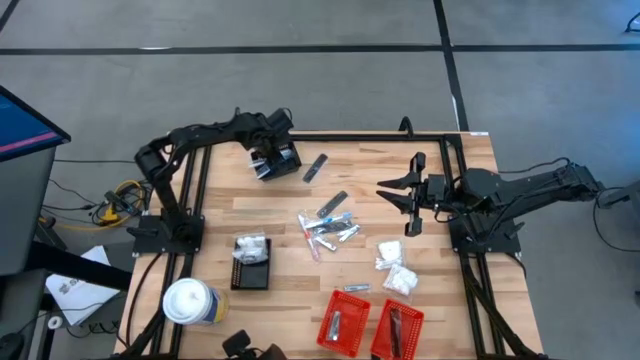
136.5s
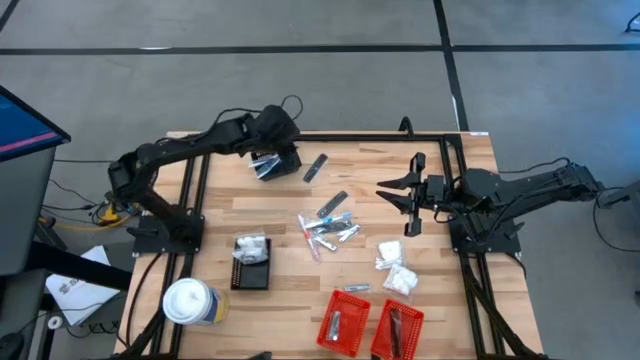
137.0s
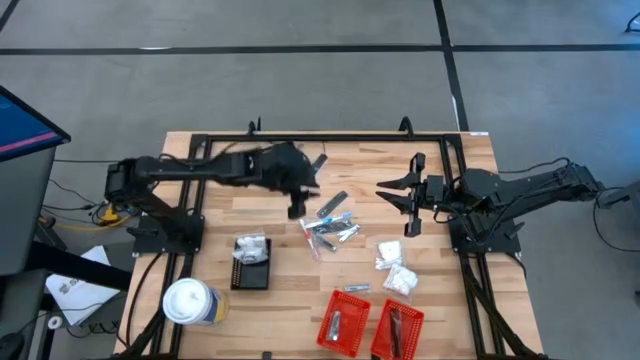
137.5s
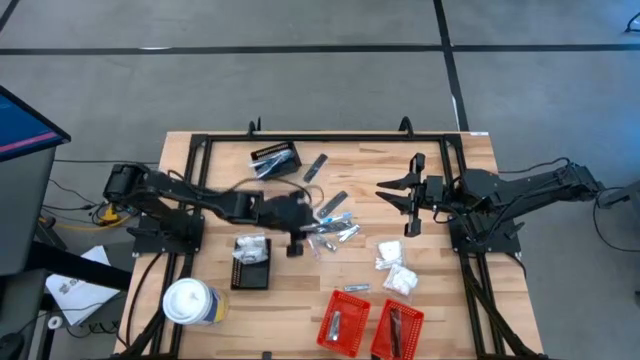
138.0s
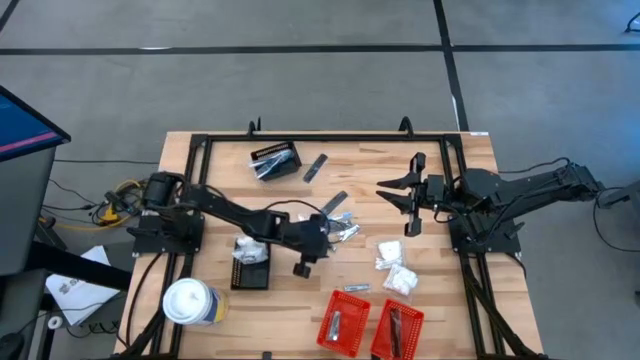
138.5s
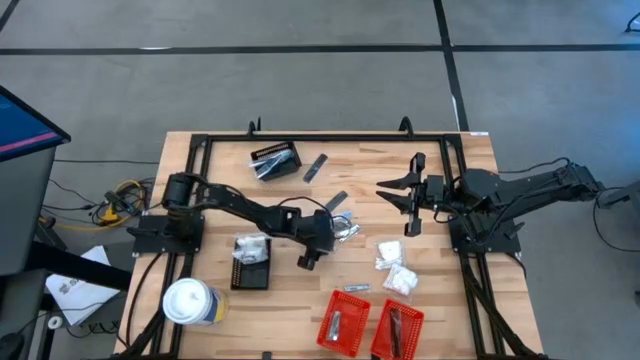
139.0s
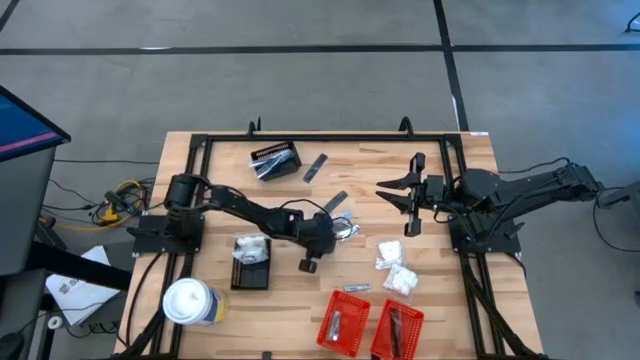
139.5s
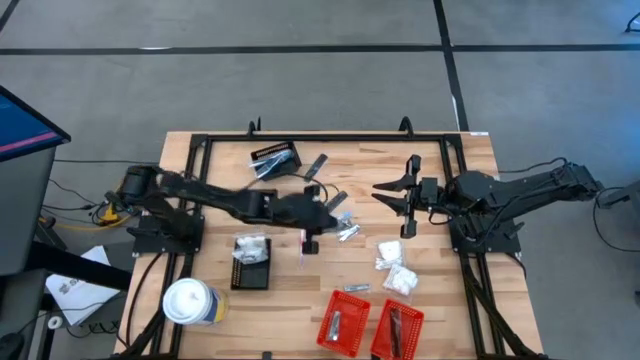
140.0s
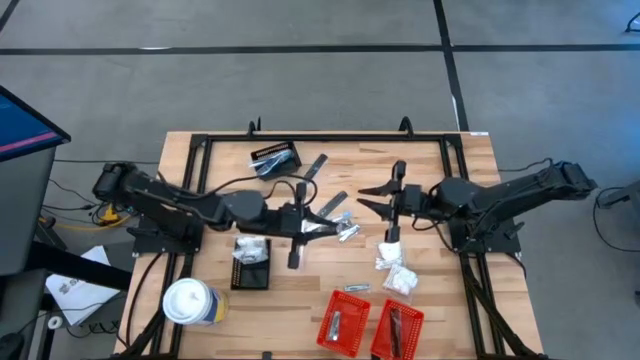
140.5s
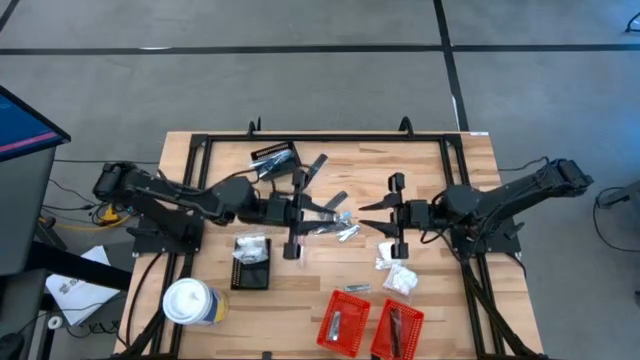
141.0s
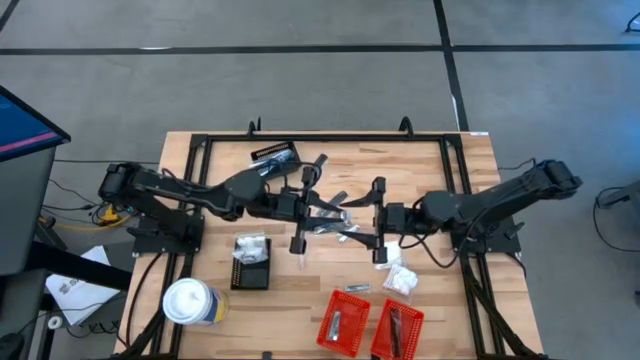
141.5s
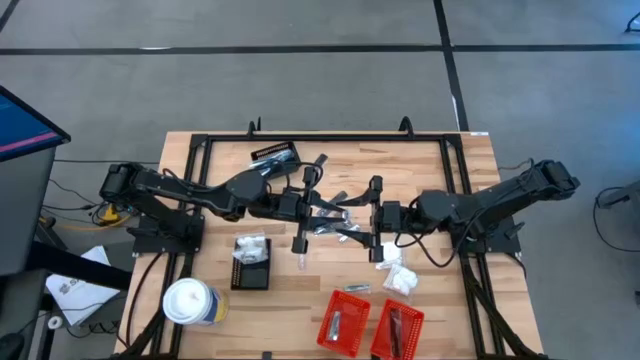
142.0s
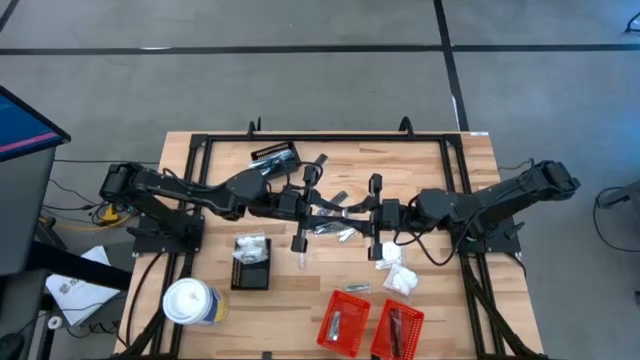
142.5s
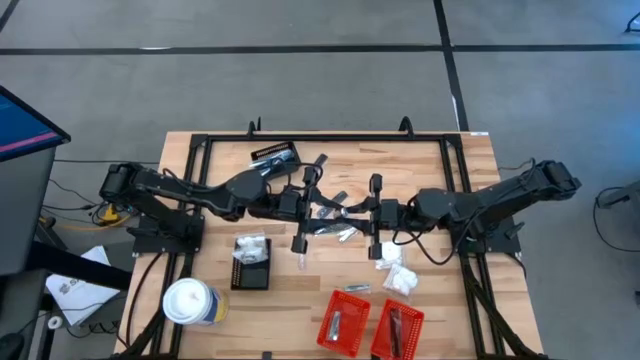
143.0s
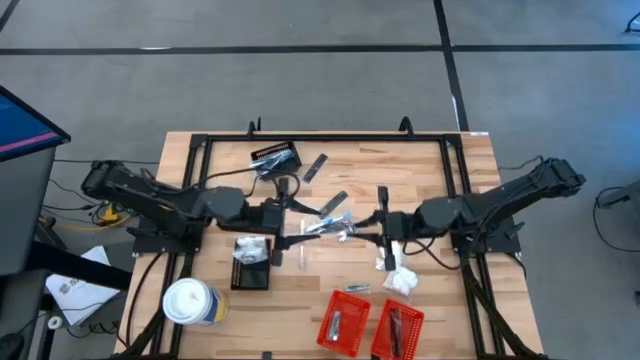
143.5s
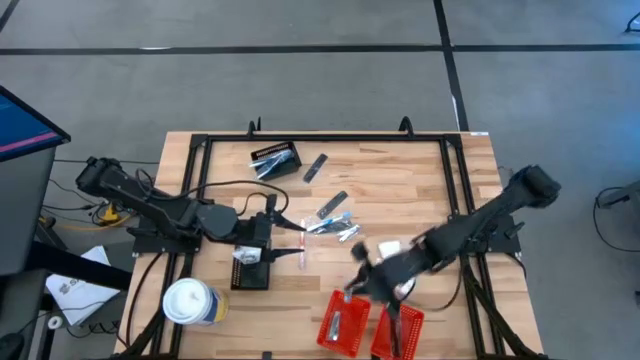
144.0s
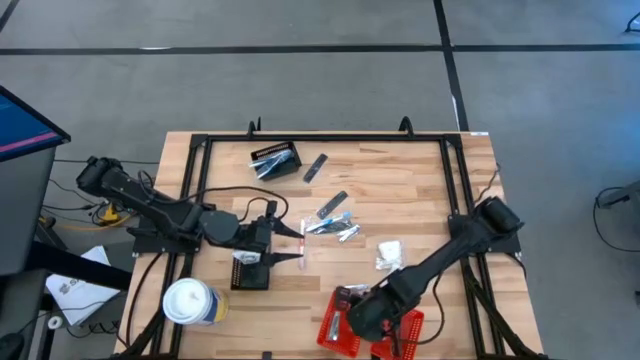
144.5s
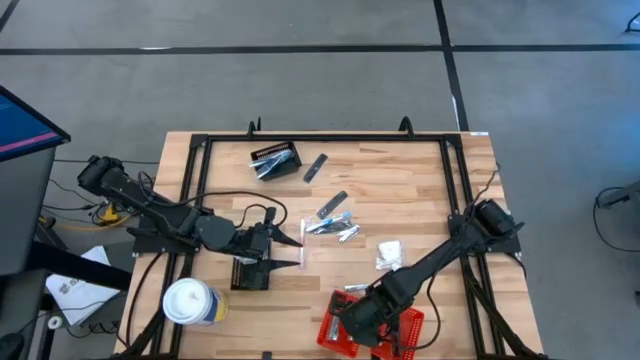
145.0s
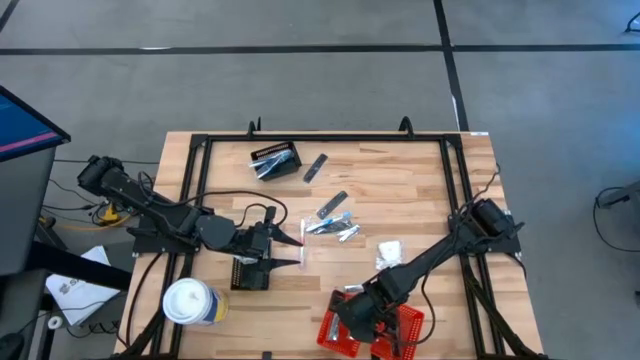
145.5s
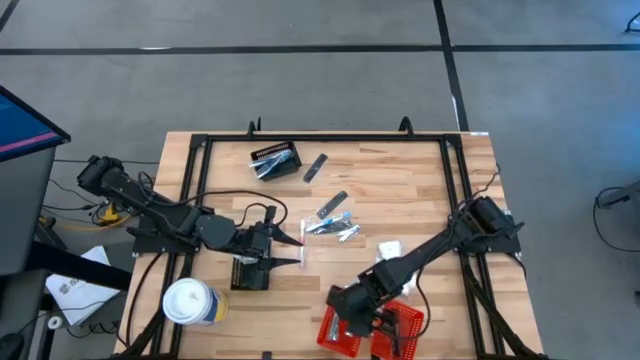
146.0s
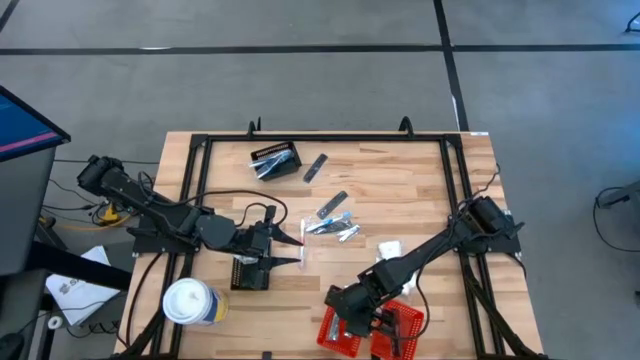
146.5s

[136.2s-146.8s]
Task: Pick & Place Travel size toiletries
Put the nail cutter into the left red bin

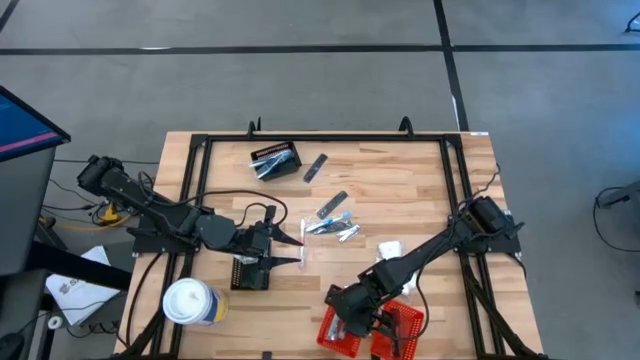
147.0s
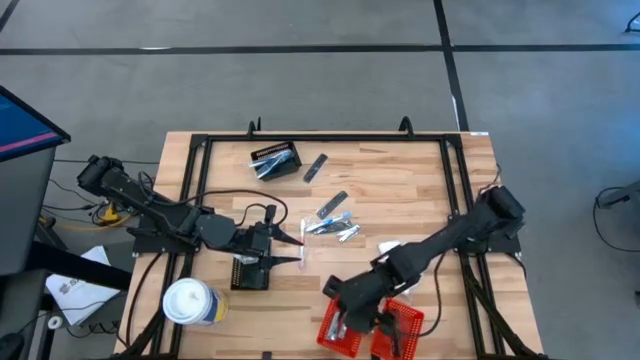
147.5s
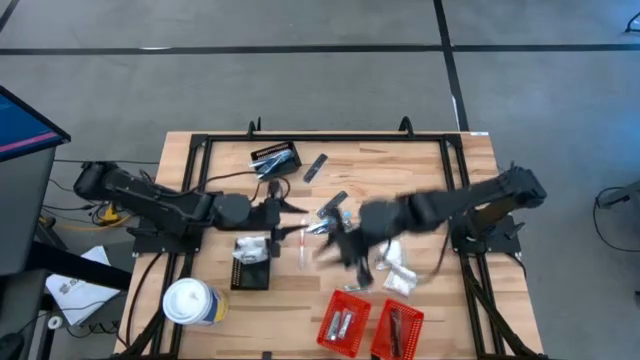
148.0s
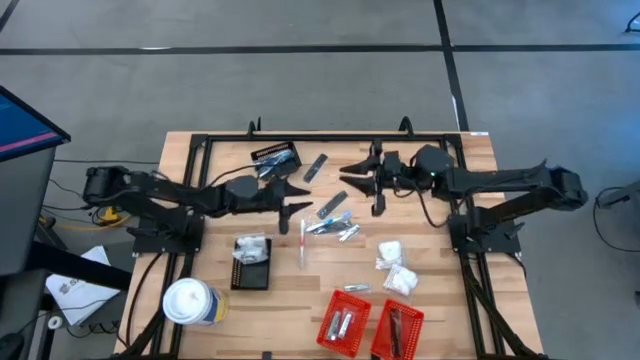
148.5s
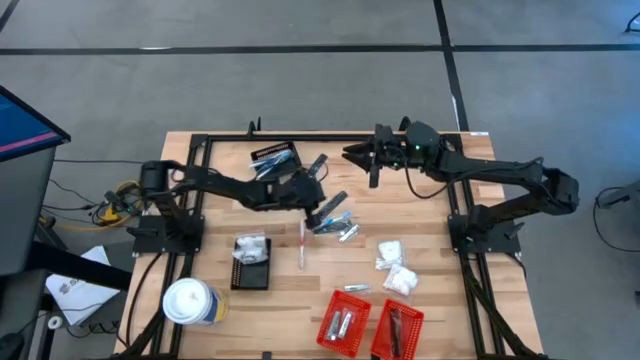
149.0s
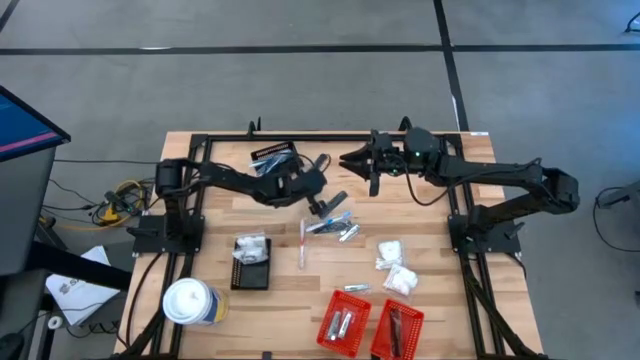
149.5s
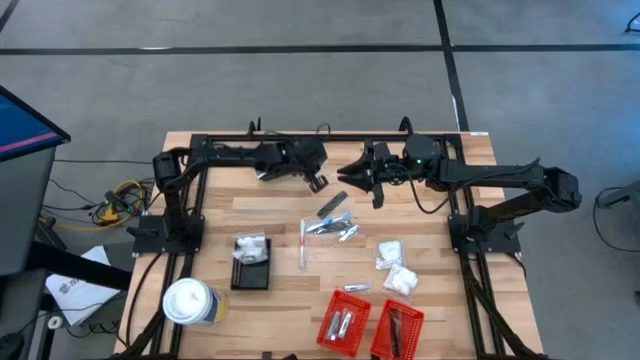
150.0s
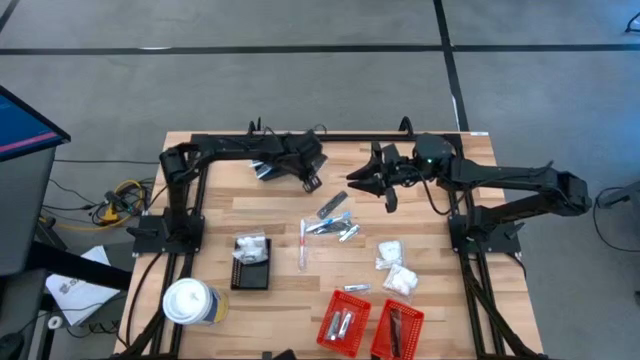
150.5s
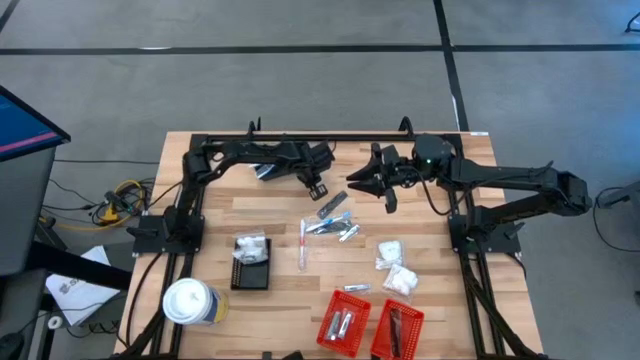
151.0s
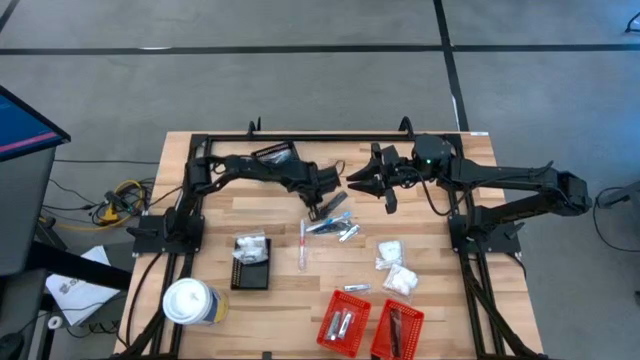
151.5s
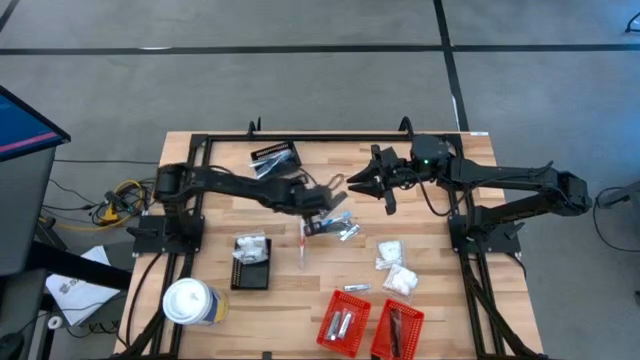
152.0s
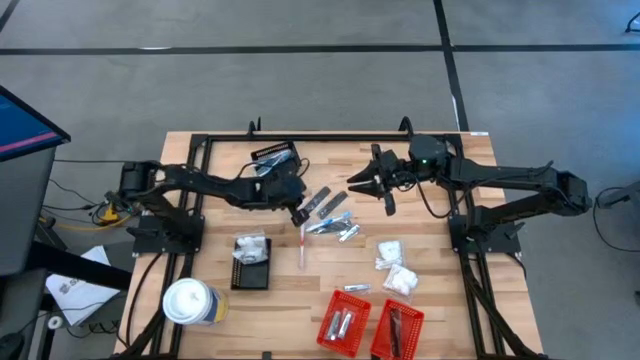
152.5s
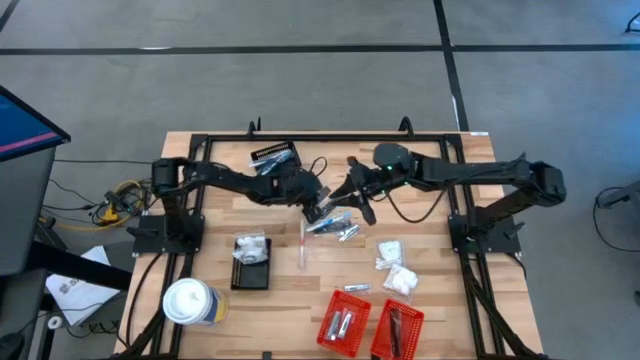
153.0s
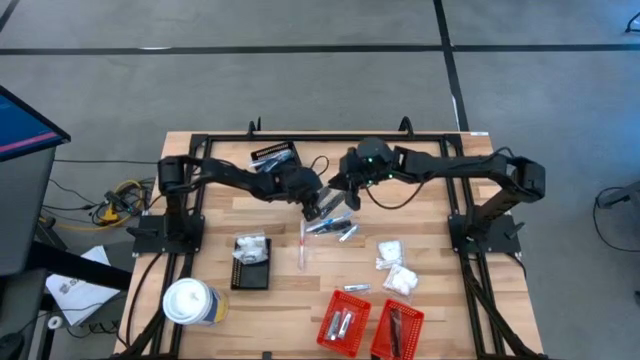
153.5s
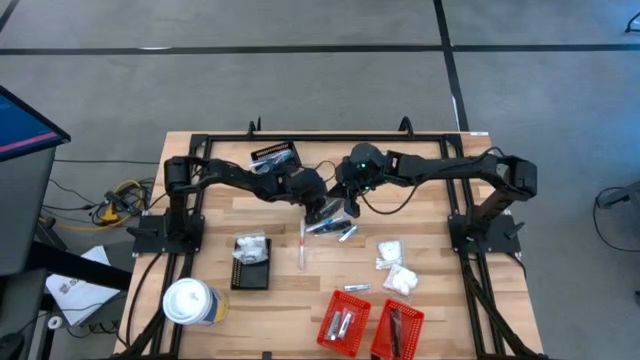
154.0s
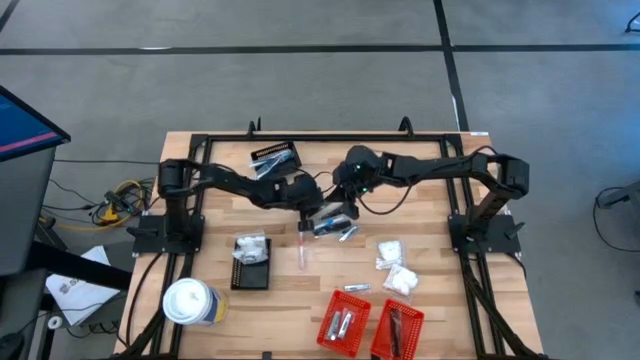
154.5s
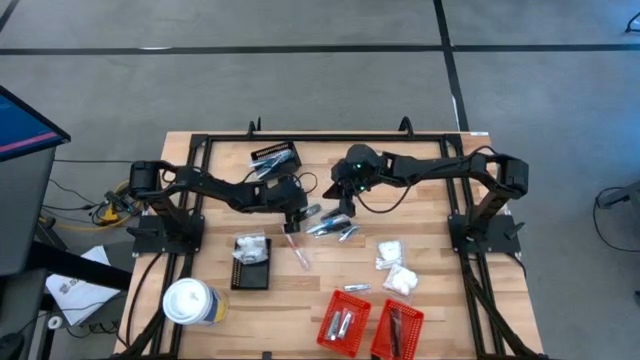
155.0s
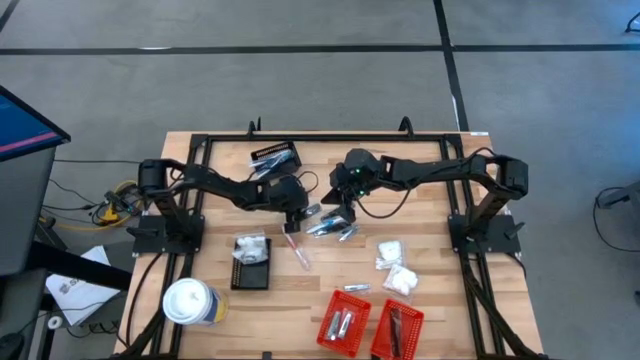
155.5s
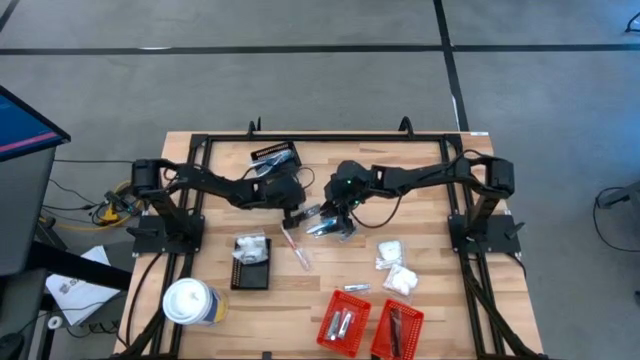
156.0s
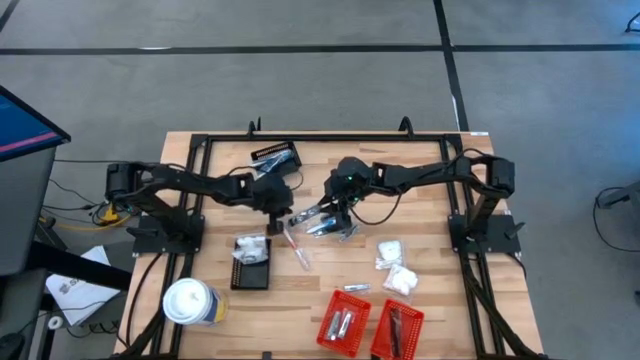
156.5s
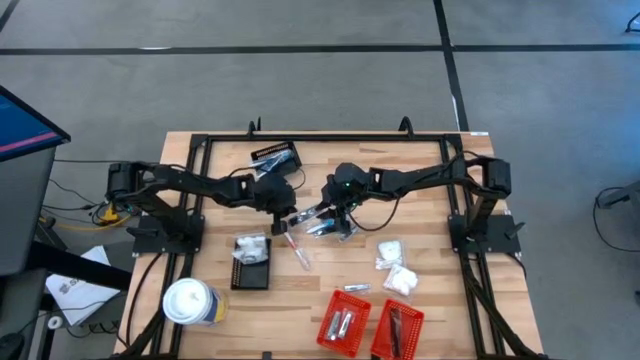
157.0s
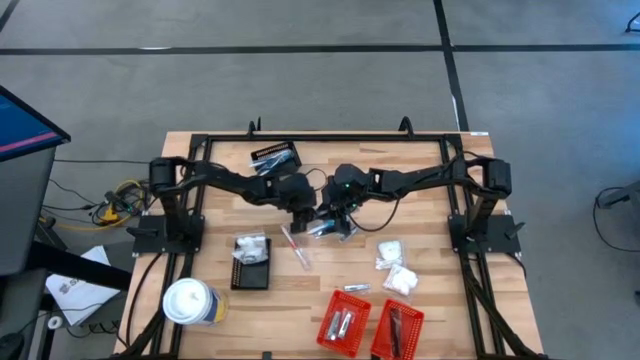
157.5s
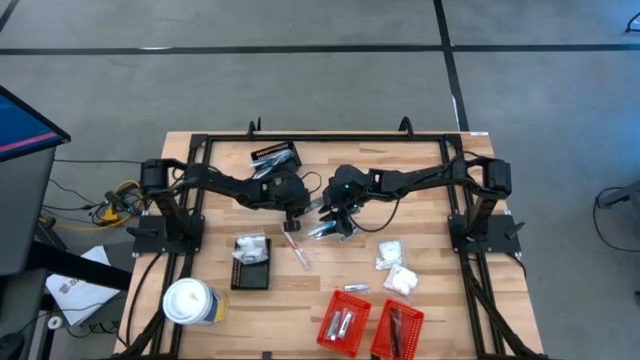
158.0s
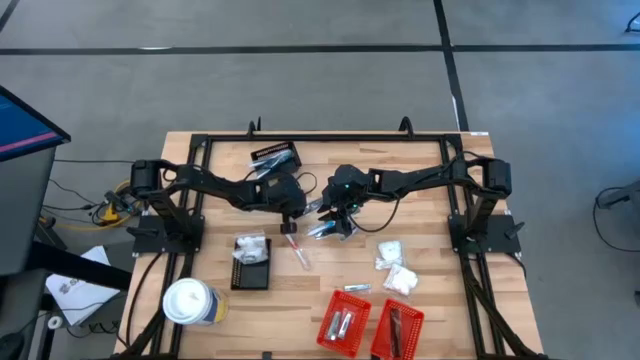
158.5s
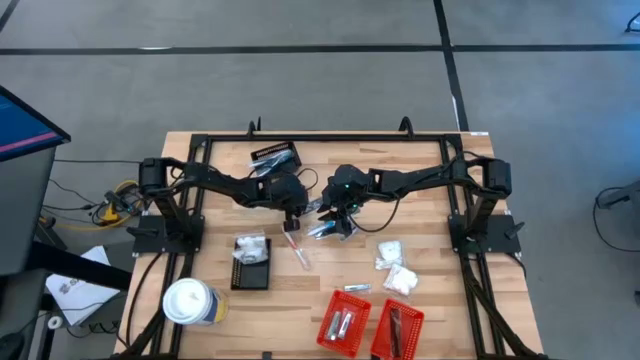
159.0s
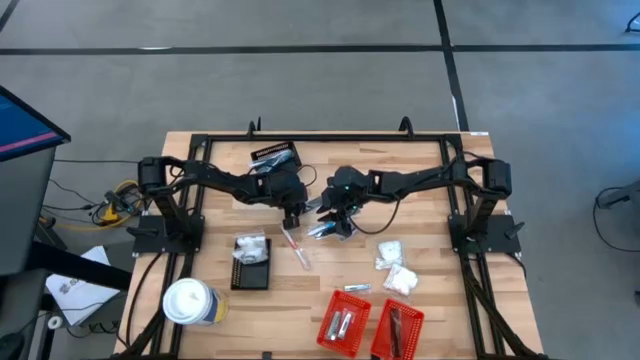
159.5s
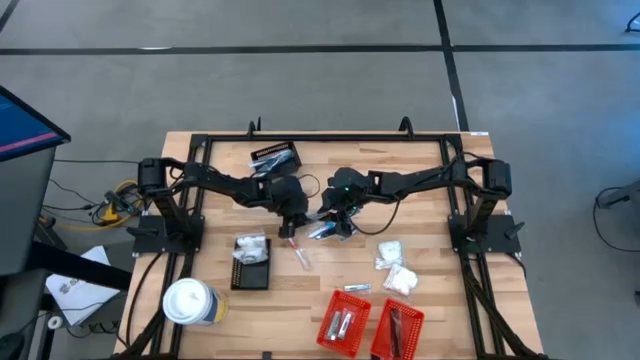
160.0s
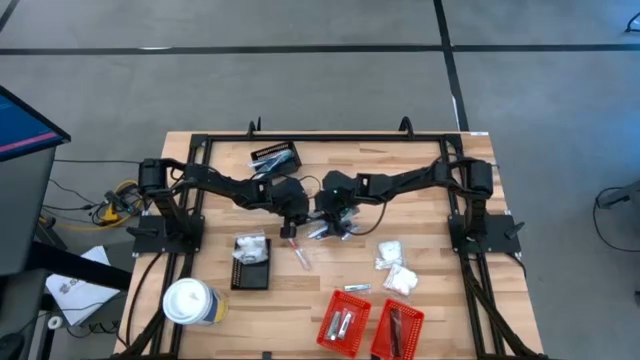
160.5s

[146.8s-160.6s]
Put the black hair brush into the right red bin
